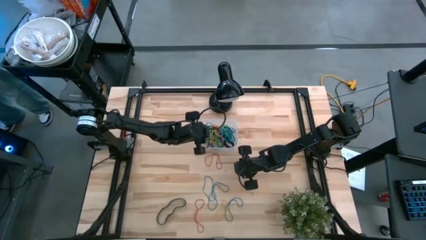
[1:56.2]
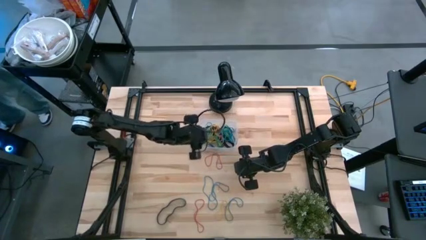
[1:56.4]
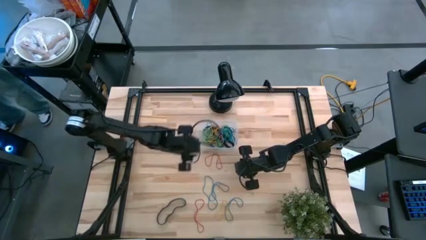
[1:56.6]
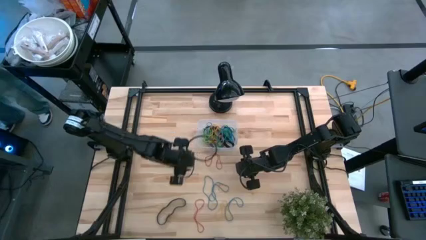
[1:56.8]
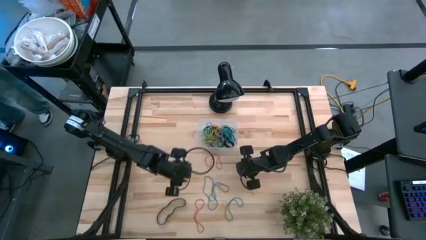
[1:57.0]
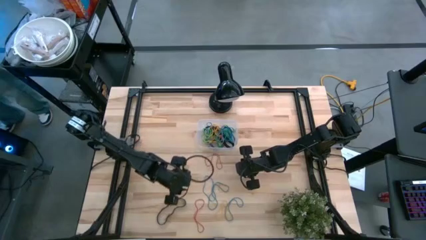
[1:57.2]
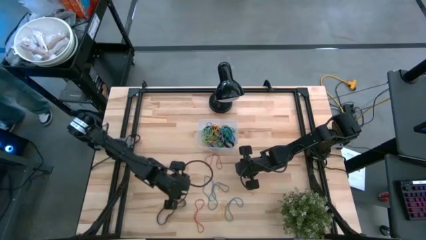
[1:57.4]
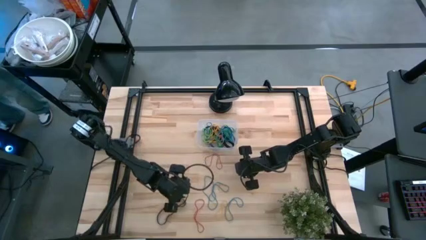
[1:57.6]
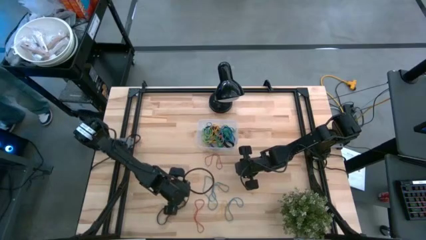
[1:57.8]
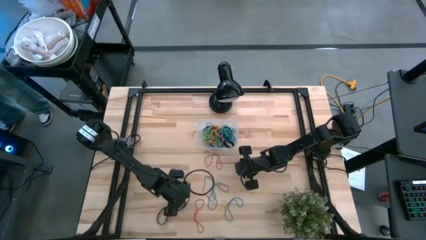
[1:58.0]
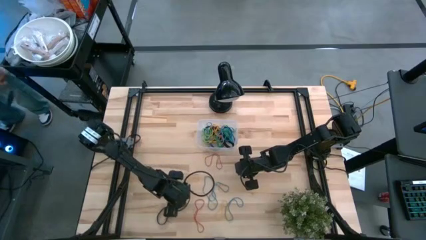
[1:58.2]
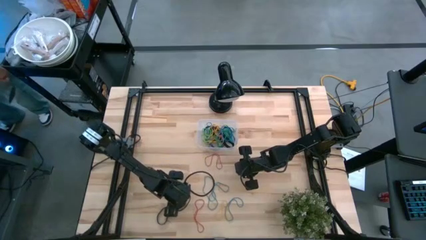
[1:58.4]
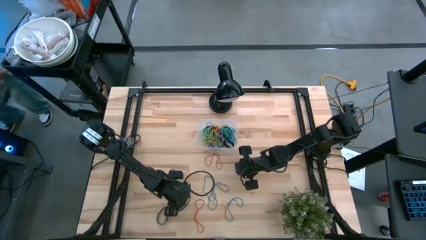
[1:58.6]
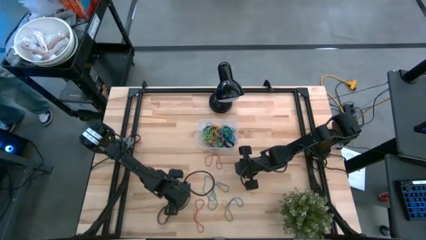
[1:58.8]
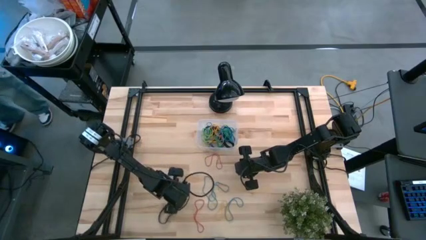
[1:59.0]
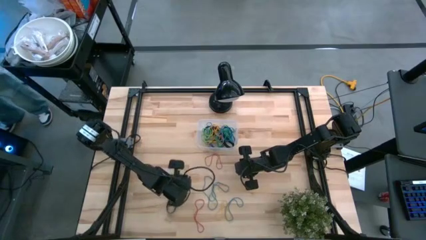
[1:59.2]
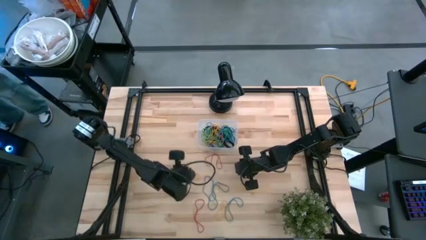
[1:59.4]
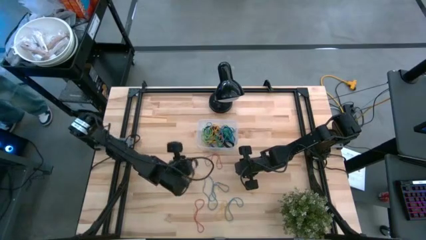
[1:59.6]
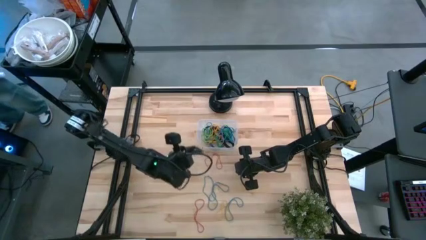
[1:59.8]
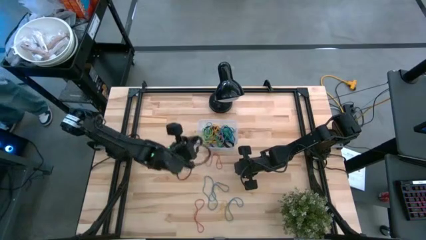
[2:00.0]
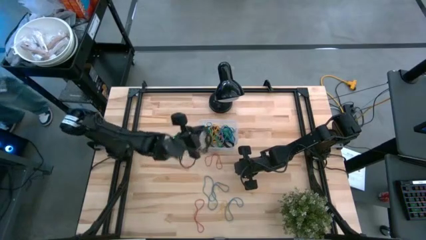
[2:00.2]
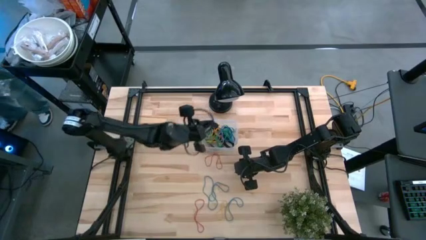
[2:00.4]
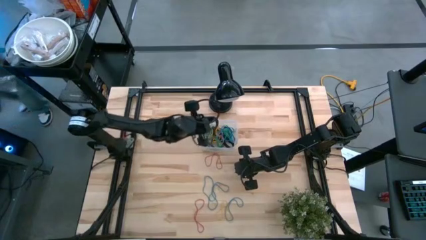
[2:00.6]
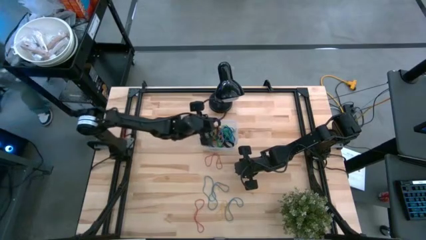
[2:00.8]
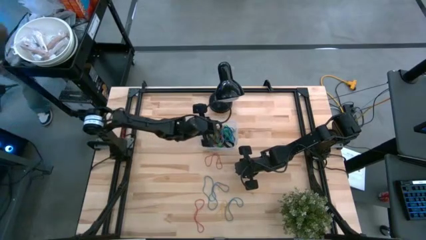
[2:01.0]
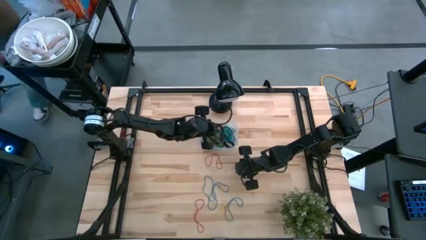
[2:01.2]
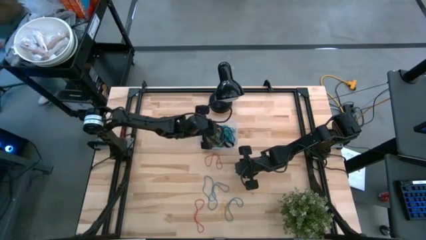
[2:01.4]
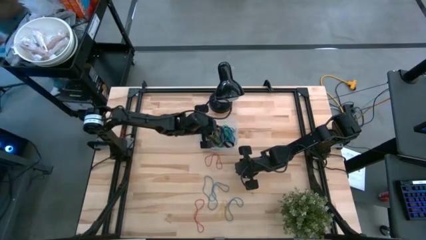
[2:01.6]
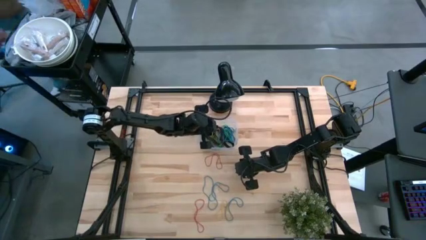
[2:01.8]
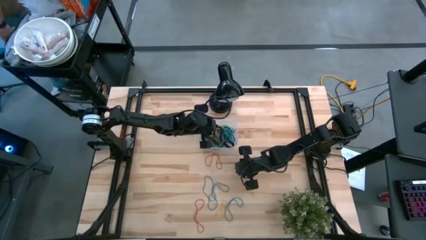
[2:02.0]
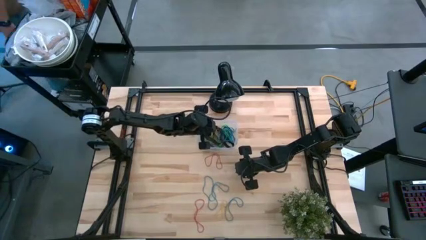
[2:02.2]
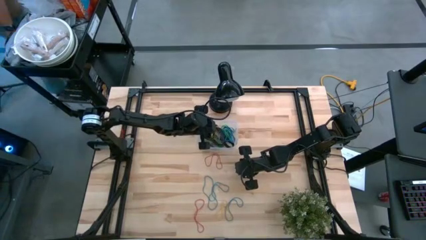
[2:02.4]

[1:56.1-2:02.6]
Task: Pick and place rubber bands into bin
Put the black rubber band into the transparent bin

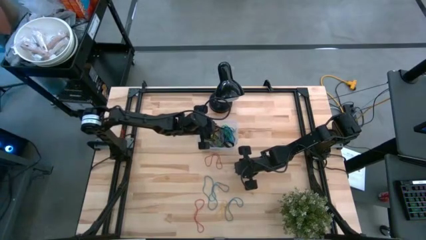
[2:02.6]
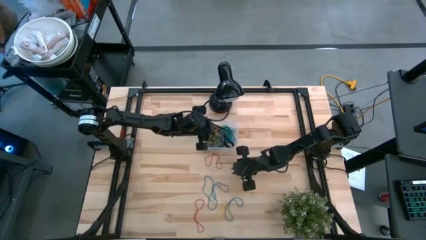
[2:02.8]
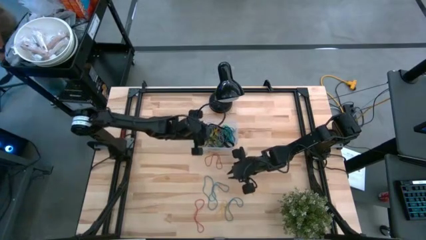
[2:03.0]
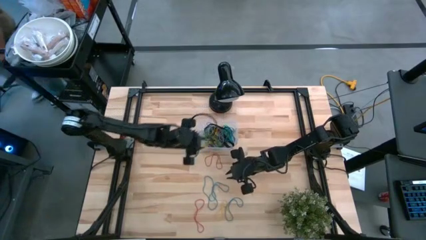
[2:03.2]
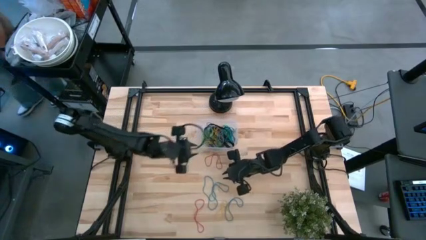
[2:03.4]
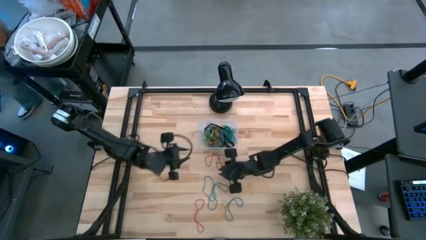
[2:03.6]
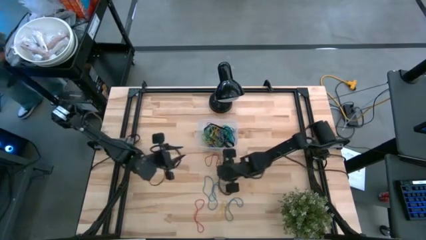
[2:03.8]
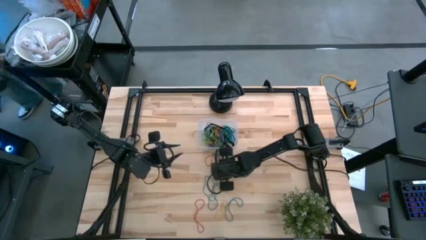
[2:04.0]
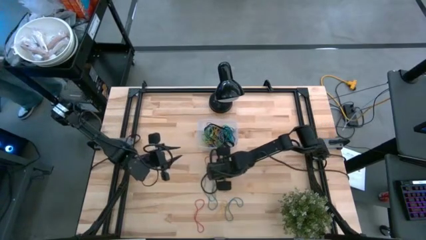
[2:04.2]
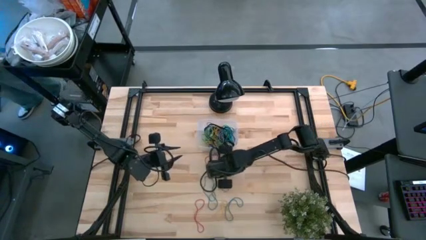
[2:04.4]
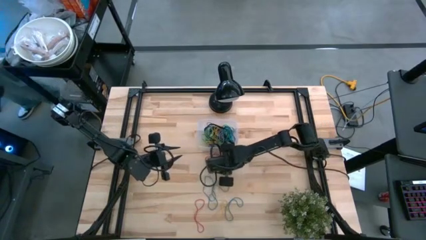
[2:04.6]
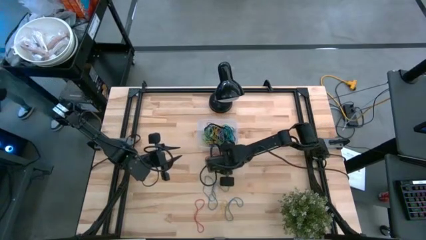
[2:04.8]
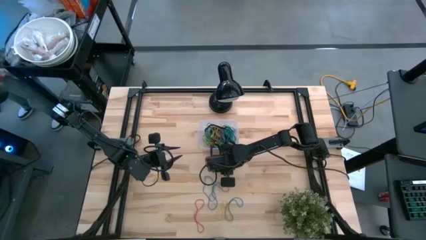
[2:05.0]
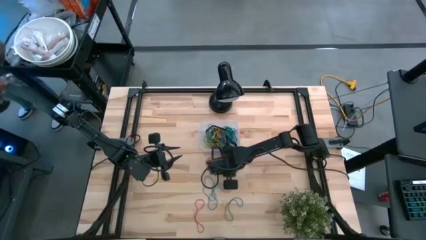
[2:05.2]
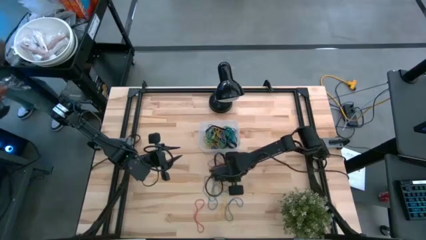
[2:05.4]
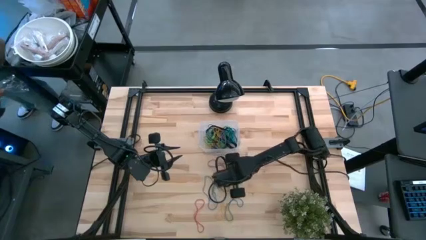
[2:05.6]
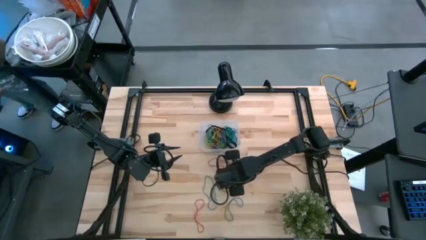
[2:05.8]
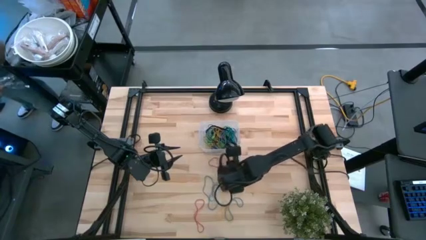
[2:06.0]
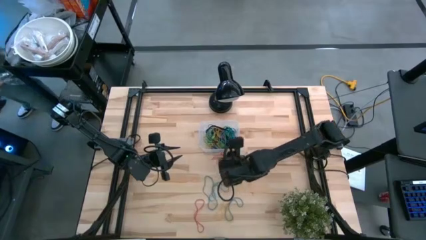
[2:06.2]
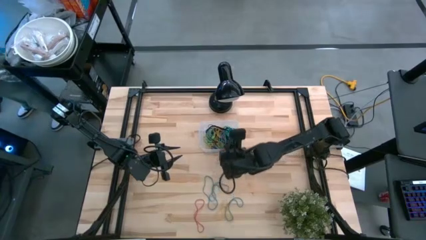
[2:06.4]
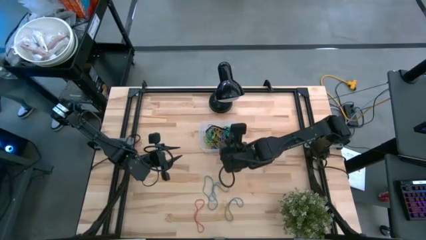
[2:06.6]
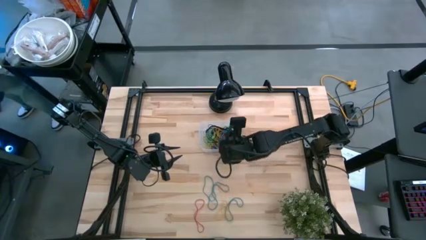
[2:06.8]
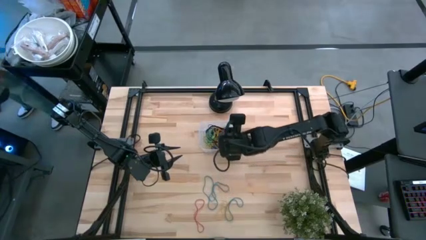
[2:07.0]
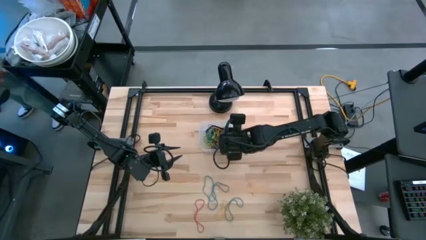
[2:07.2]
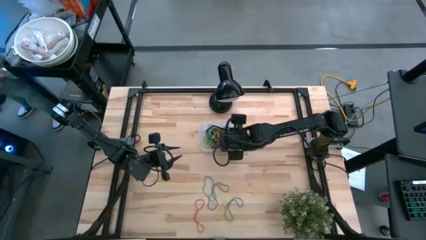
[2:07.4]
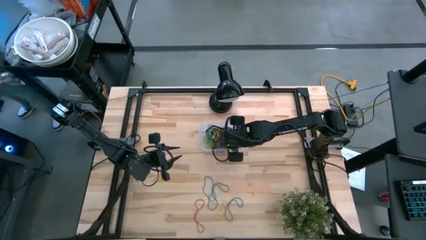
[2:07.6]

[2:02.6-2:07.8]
Put the red rubber band into the transparent bin

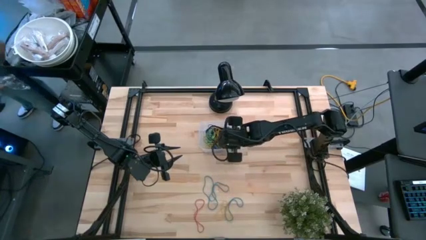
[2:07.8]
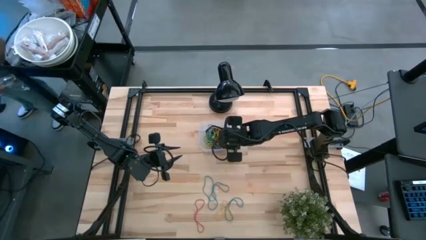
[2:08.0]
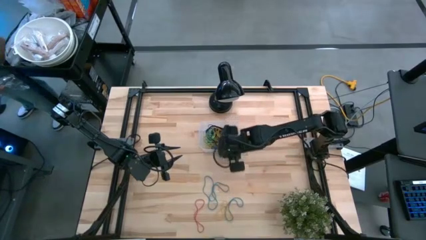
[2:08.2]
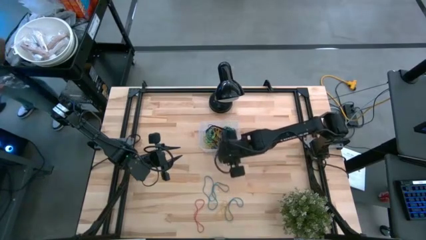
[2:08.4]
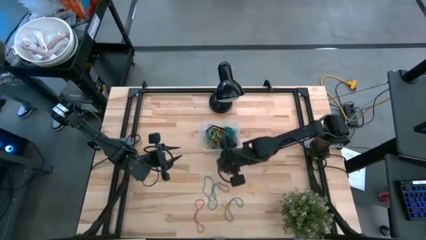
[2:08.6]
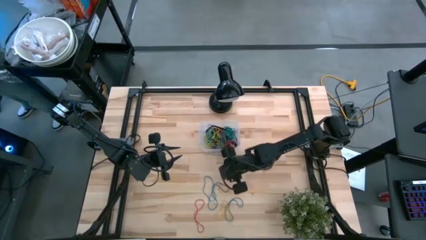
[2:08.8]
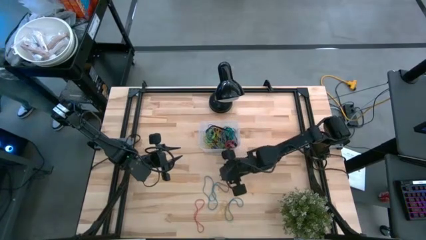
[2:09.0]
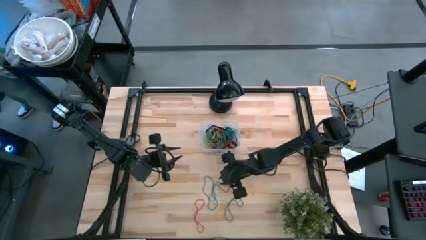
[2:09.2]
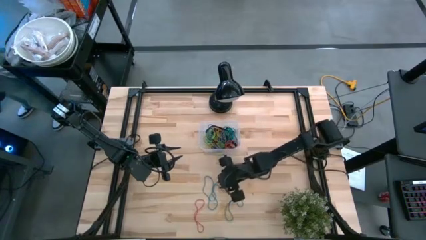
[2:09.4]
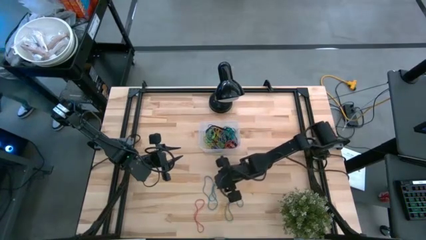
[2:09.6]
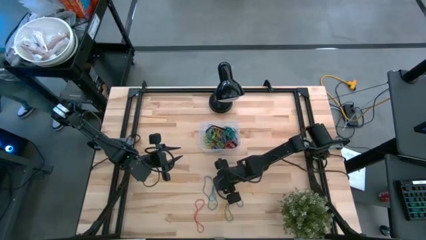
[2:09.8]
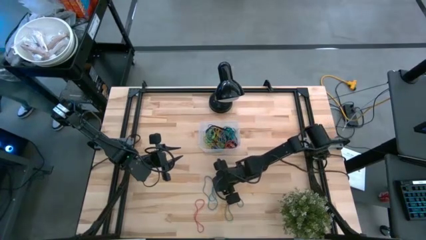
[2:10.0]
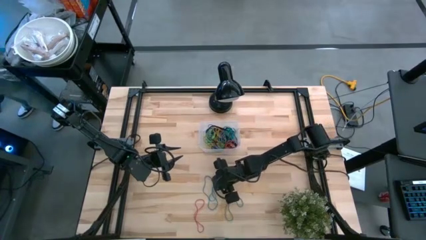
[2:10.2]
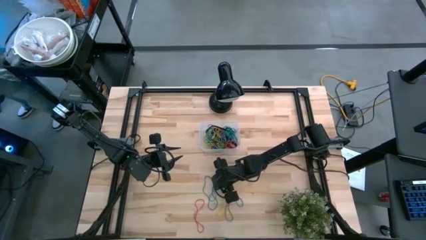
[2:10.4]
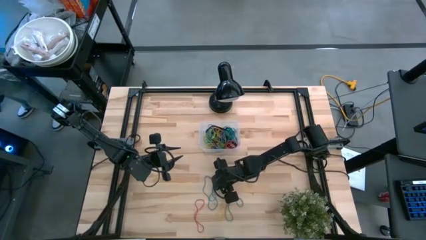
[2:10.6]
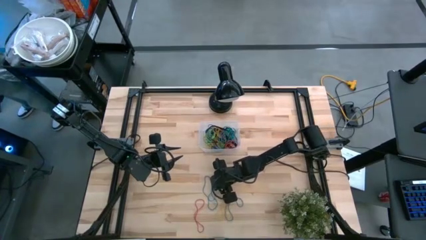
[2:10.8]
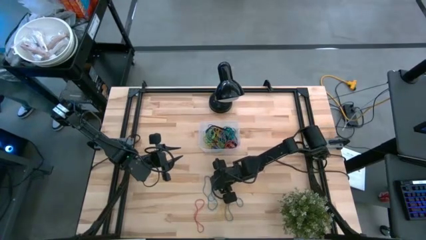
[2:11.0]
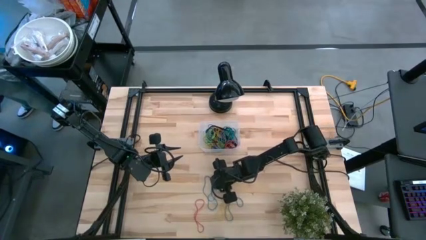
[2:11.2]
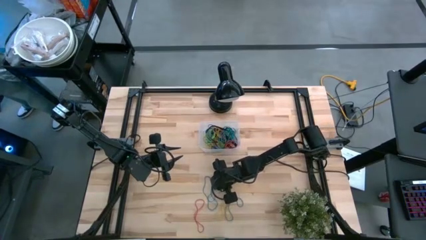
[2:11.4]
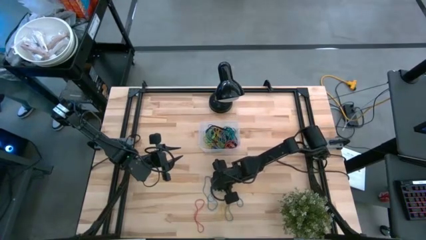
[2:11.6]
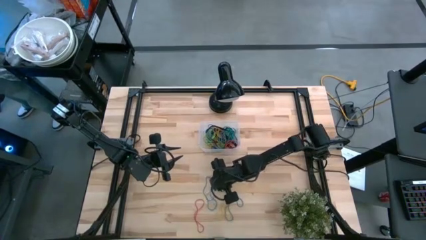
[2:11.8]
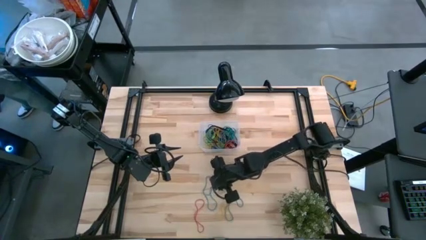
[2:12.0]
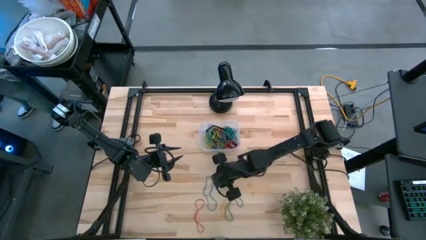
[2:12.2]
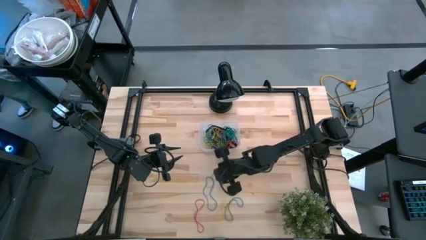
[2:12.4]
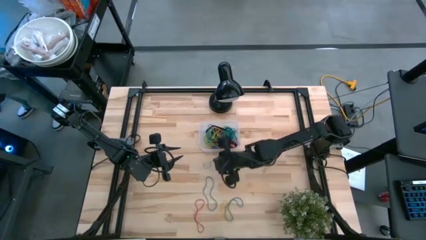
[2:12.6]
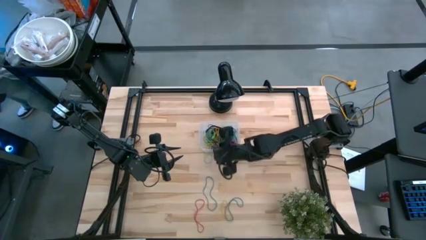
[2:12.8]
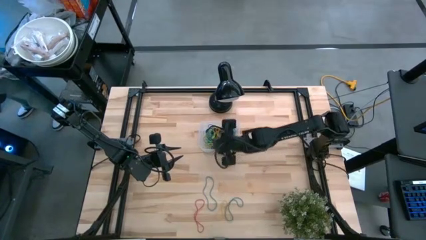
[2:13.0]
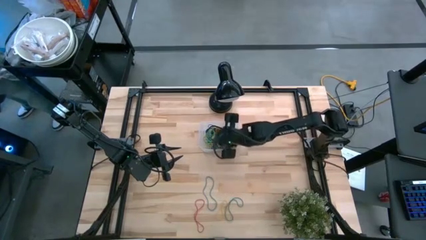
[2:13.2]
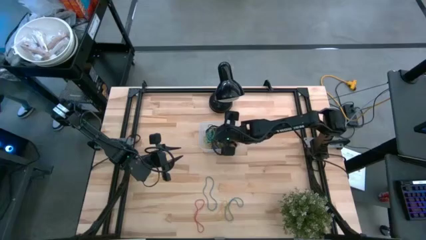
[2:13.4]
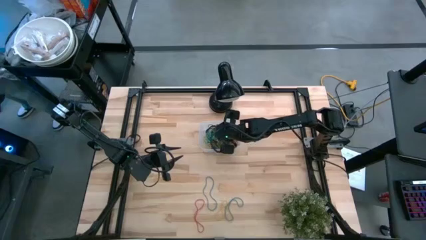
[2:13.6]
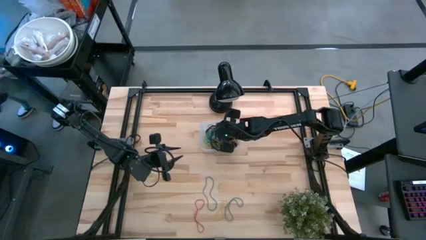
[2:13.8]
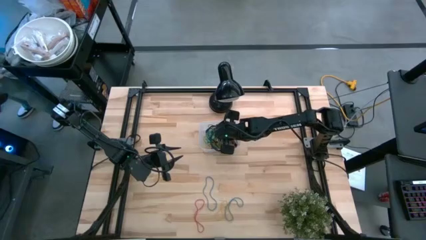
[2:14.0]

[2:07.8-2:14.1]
Put the blue rubber band into the transparent bin
